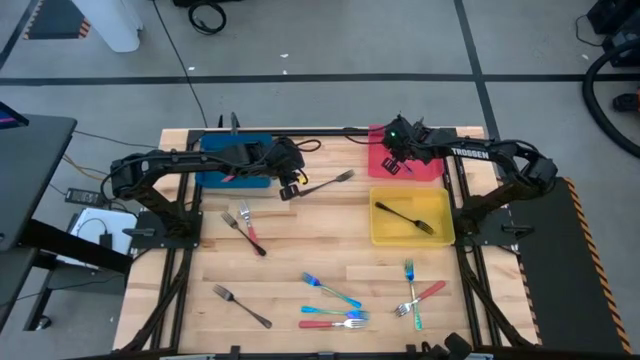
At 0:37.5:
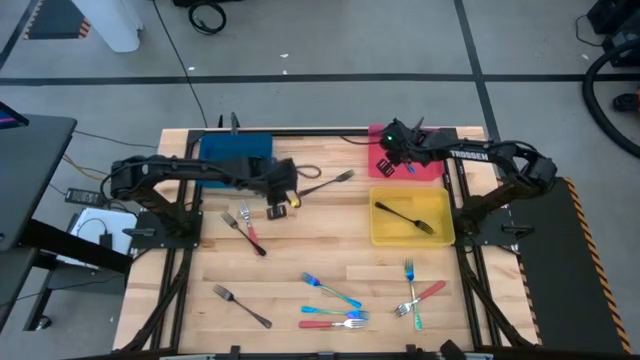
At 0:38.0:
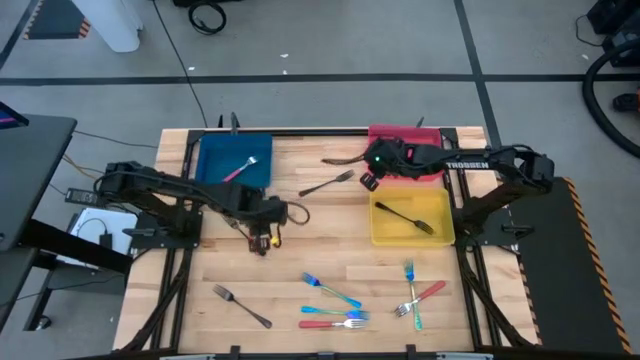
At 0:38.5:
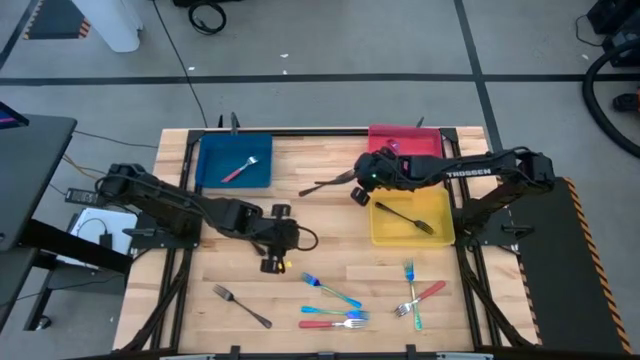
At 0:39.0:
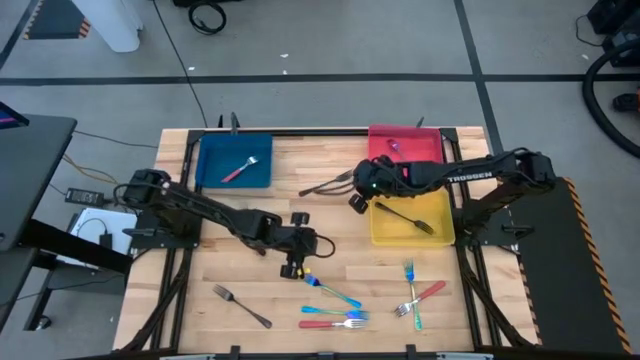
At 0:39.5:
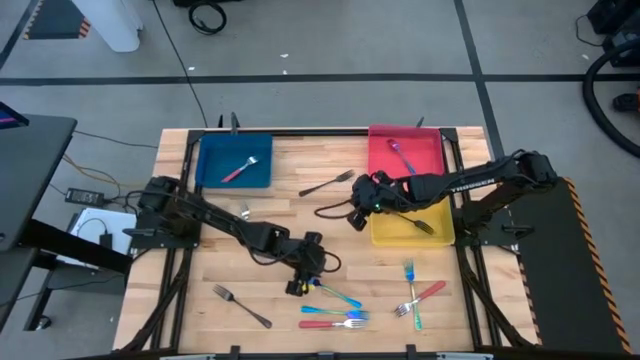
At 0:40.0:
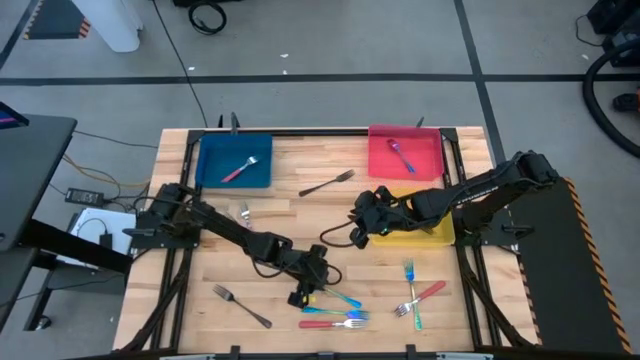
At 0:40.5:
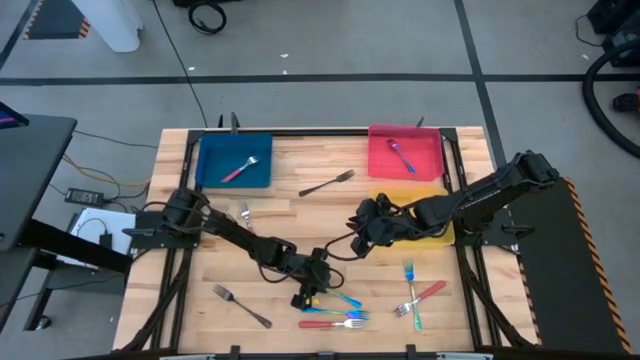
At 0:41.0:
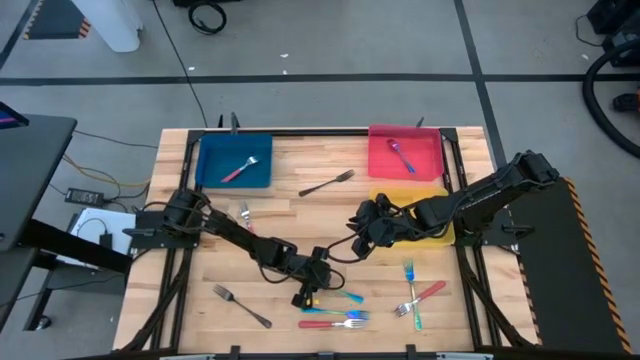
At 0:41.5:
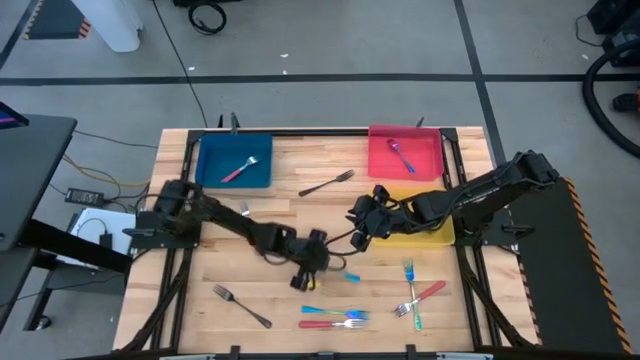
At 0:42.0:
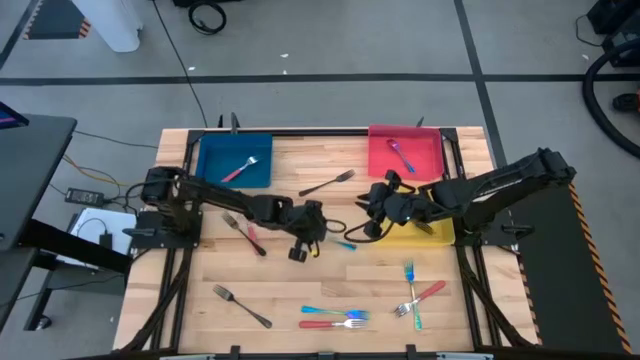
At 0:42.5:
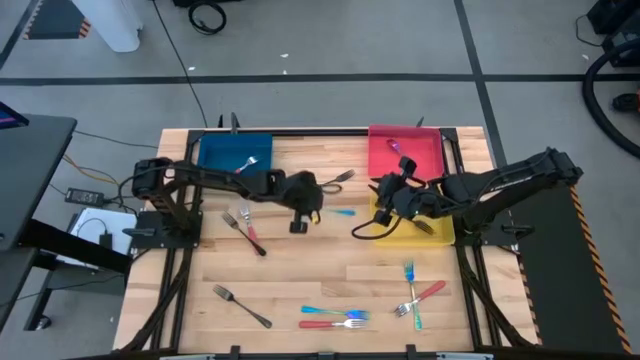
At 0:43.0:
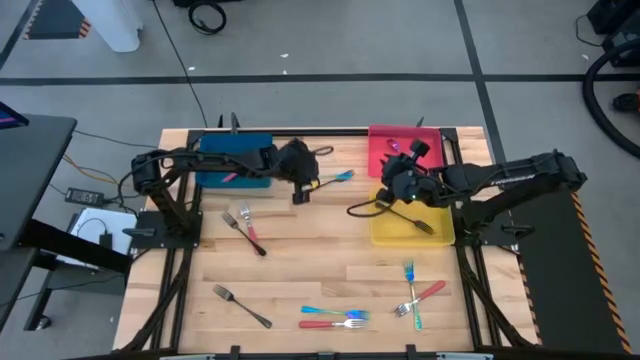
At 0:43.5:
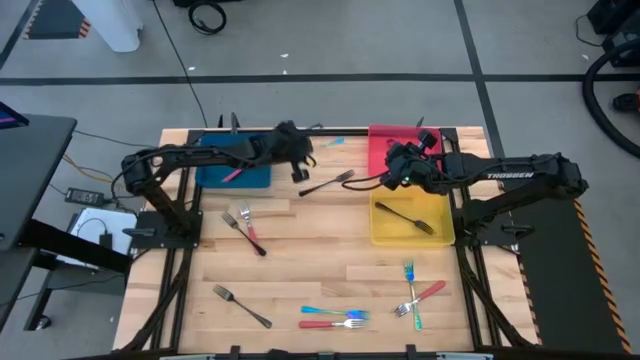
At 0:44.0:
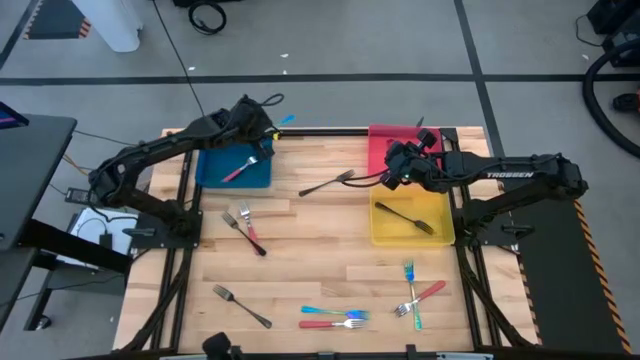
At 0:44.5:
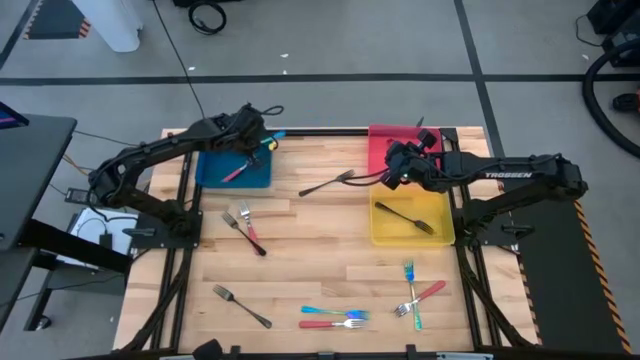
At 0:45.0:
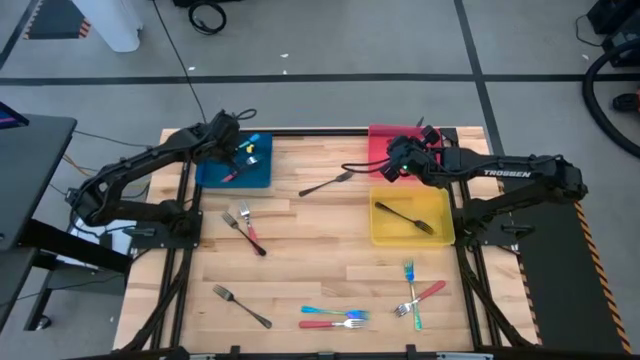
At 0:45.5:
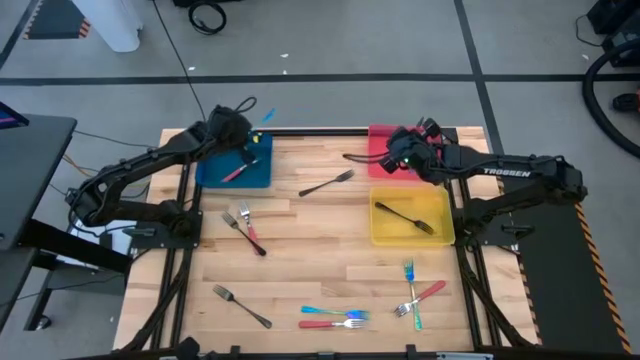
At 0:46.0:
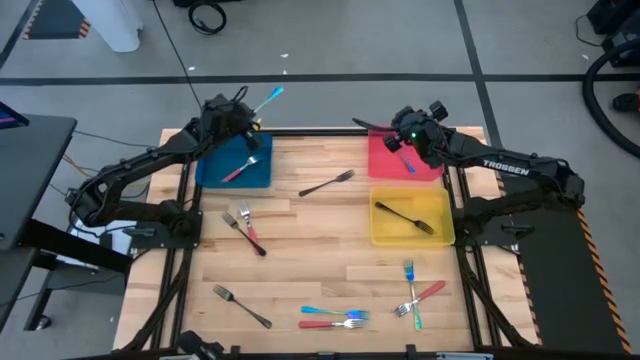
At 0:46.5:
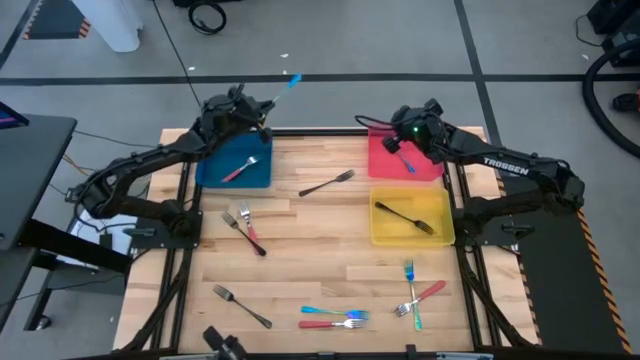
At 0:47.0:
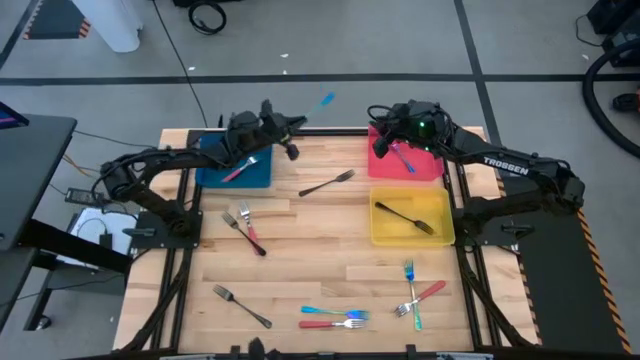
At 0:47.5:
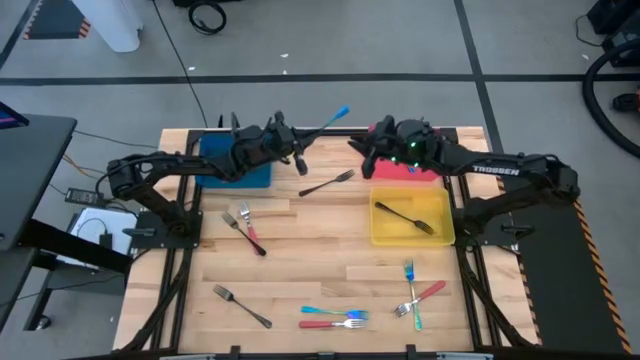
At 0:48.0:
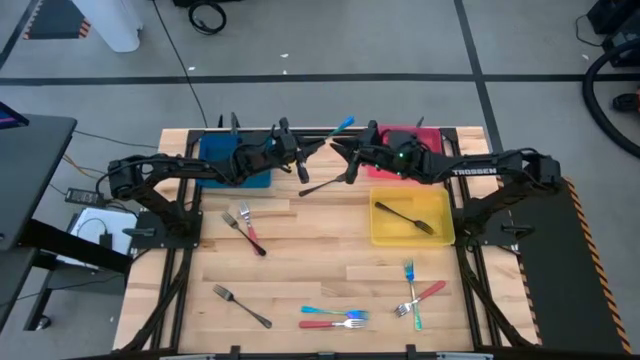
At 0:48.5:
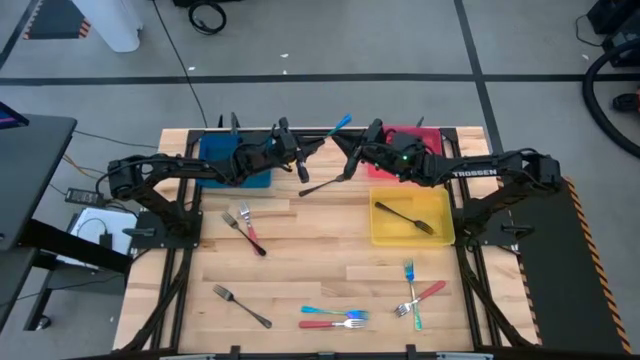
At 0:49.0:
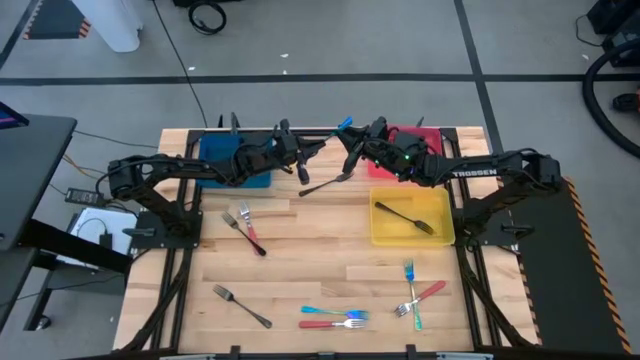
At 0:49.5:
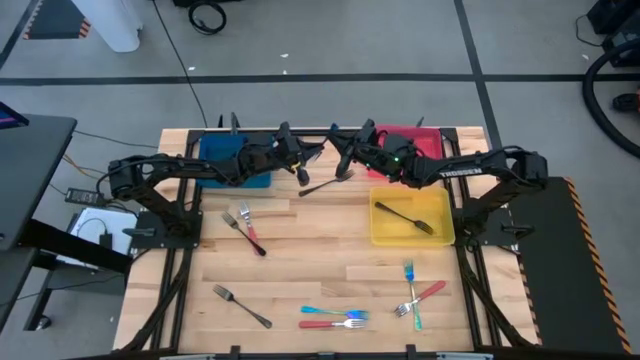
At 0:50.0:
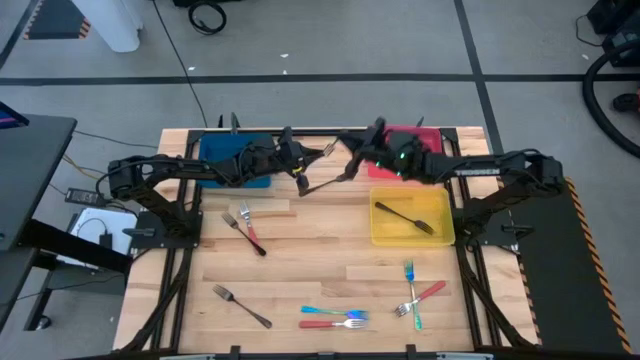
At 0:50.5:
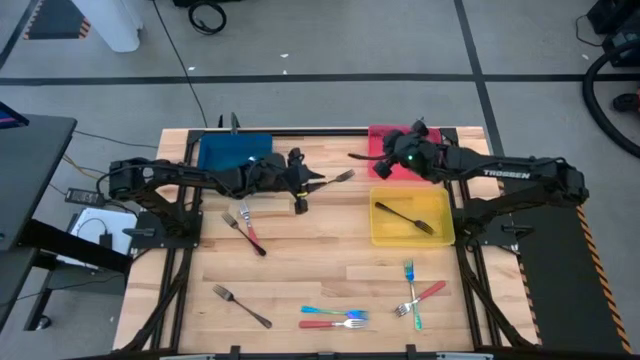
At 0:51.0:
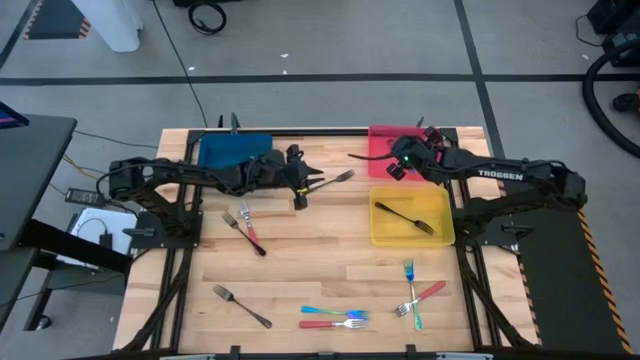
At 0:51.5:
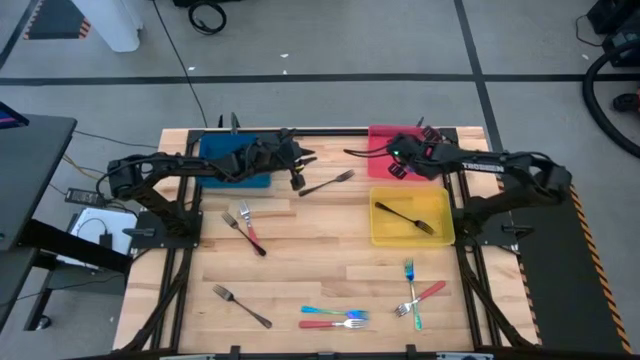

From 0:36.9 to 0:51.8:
Task: Sort silverware by color (type)
Put the blue fork into the red bin

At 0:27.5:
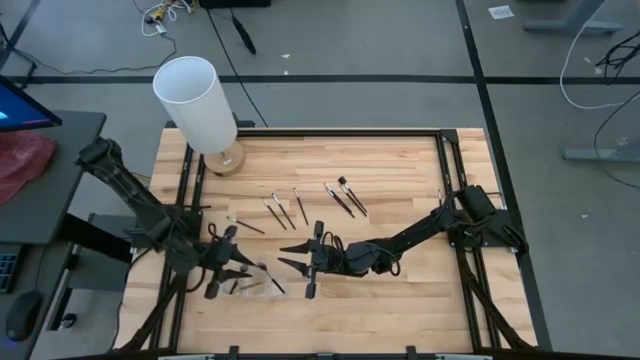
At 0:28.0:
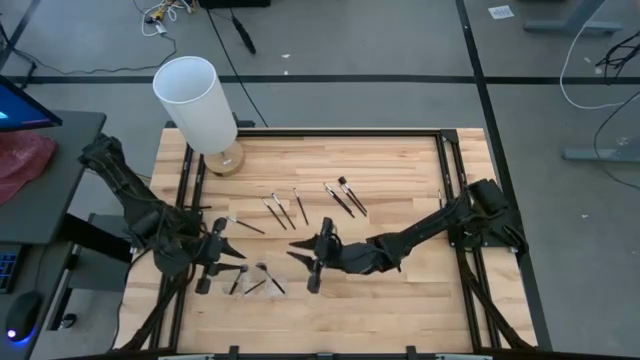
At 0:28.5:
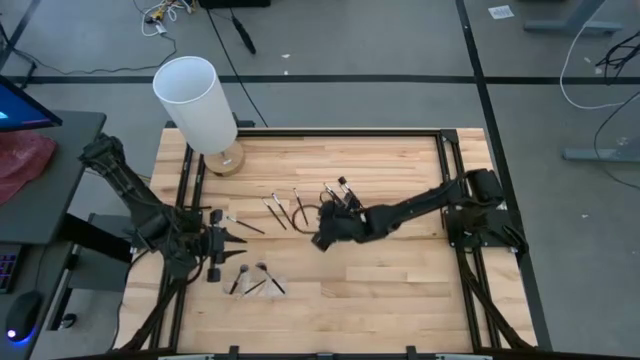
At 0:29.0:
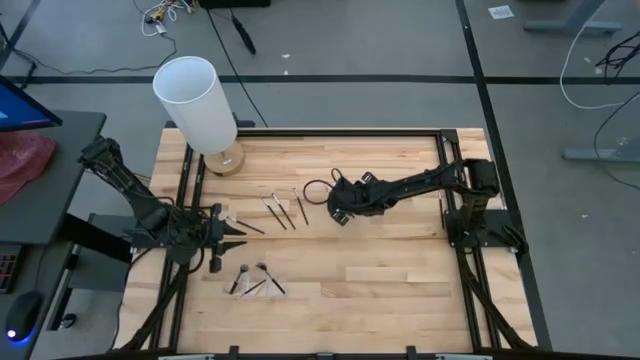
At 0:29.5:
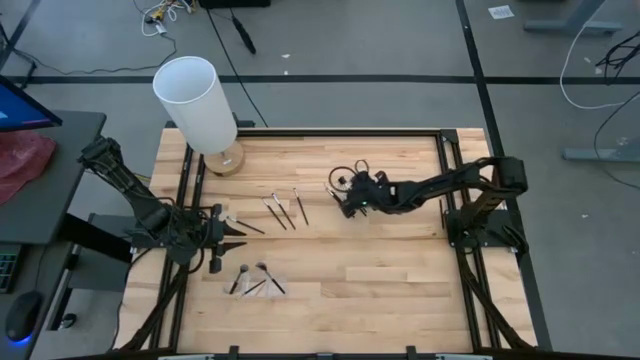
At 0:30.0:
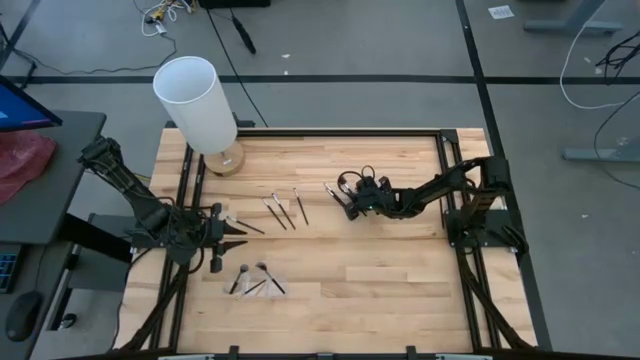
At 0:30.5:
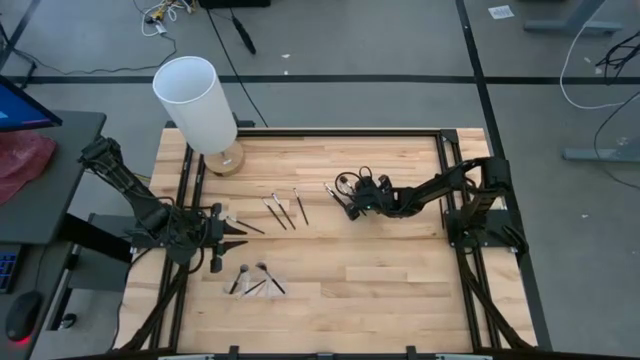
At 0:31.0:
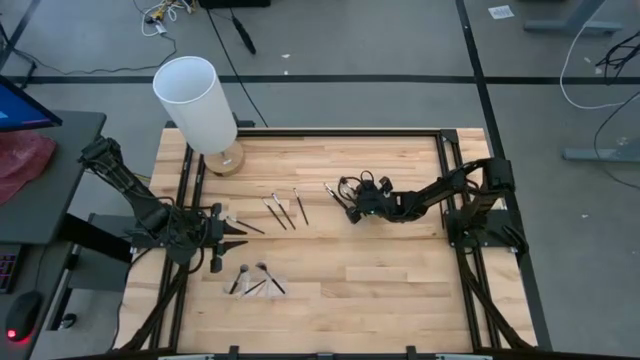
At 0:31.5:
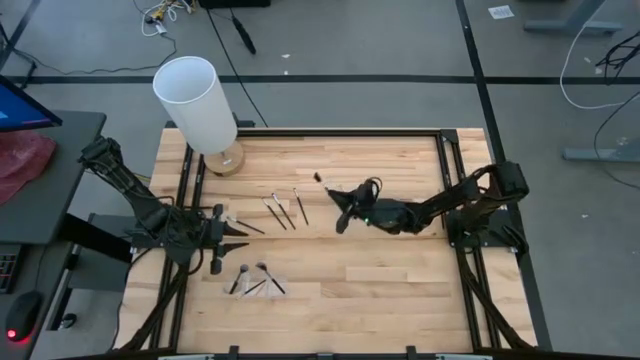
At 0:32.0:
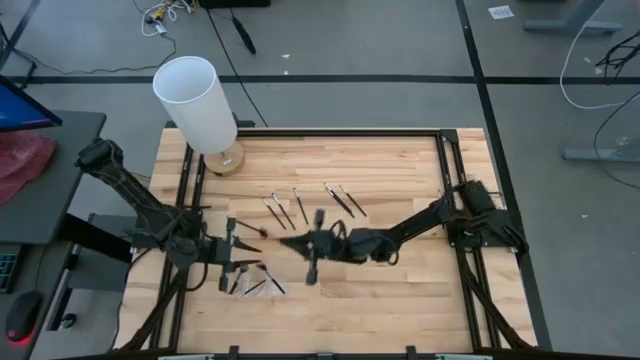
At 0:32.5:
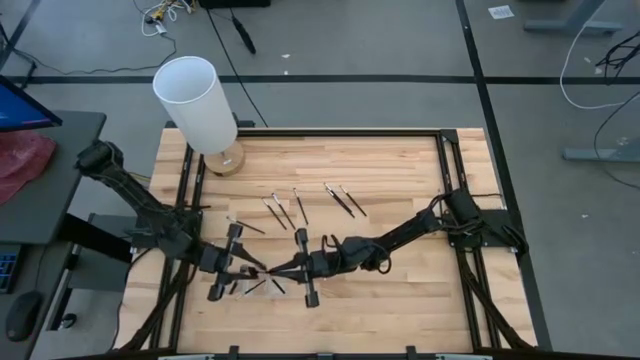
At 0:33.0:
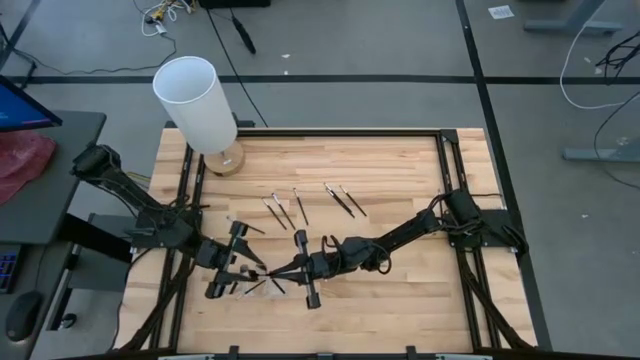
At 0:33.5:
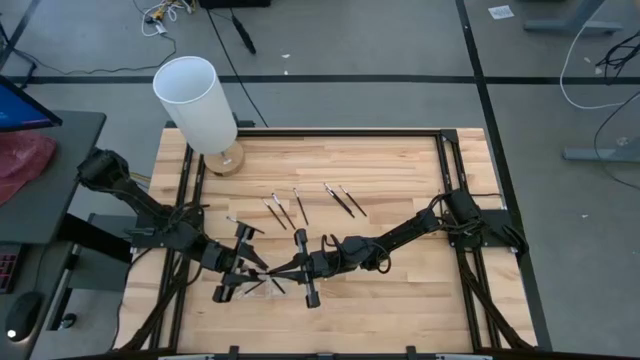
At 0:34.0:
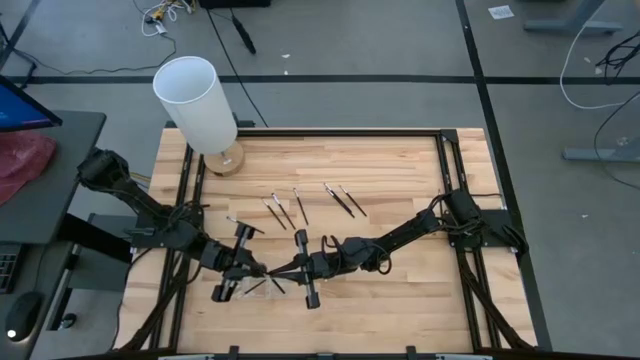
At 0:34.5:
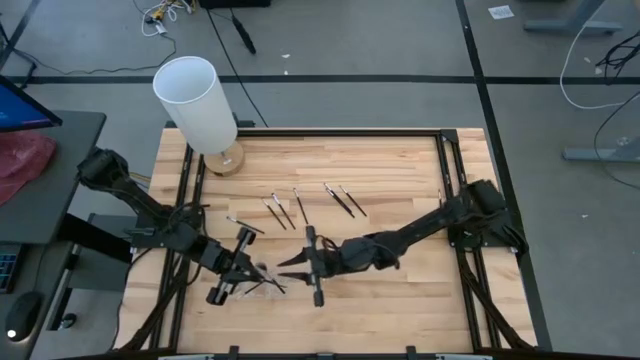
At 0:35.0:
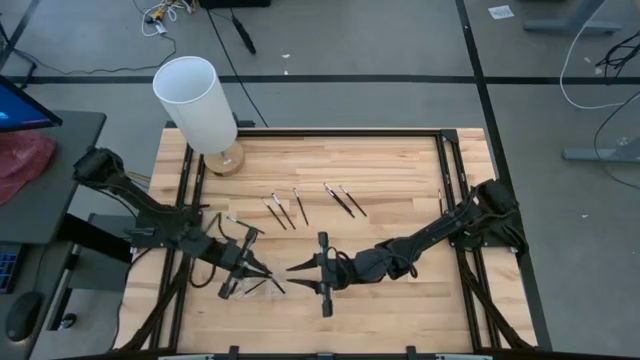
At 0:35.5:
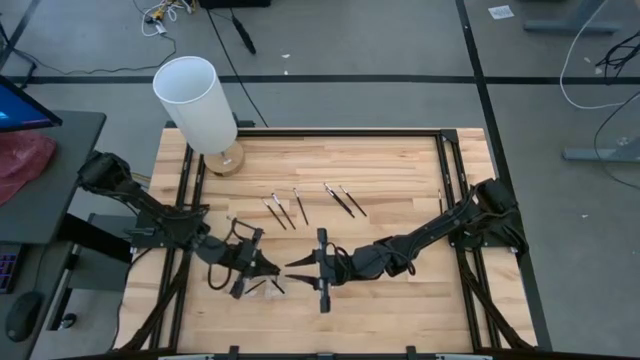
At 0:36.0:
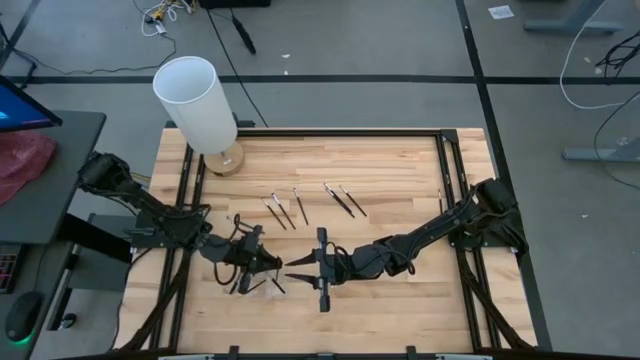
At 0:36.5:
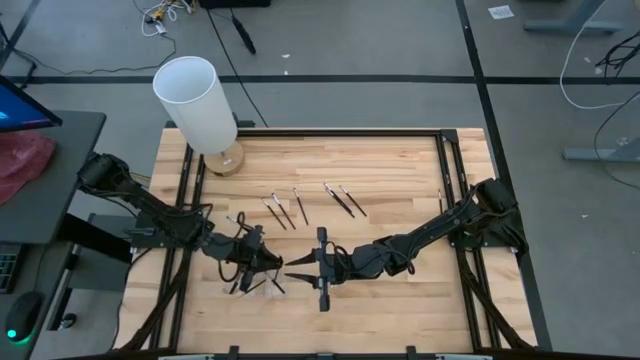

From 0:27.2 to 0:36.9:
Task: Put items in baskets/containers
Put the eye groomer brush into the transparent organizer
